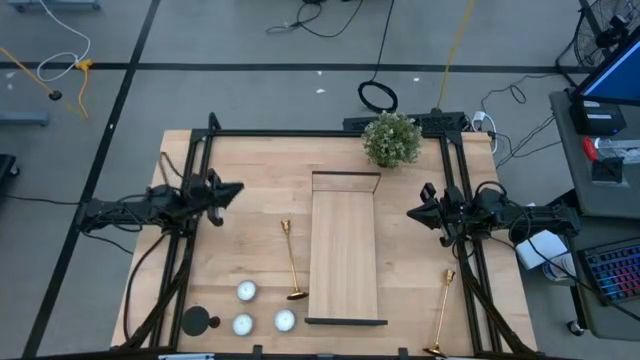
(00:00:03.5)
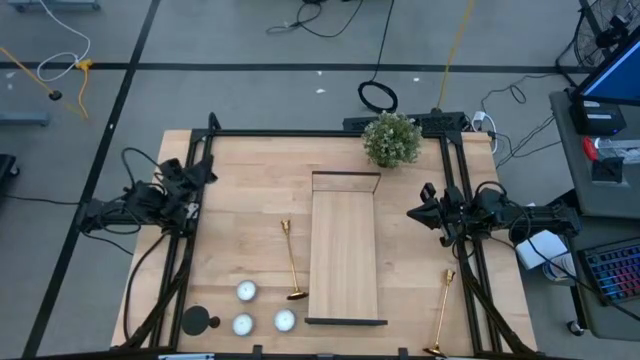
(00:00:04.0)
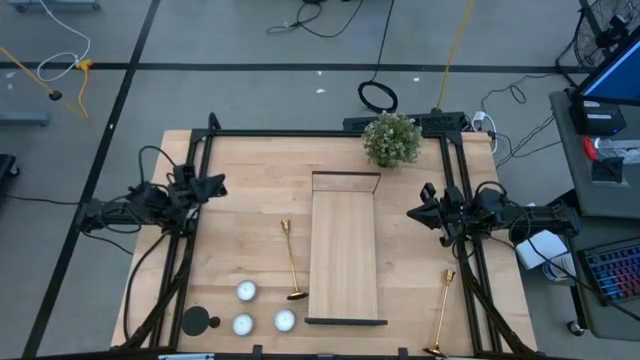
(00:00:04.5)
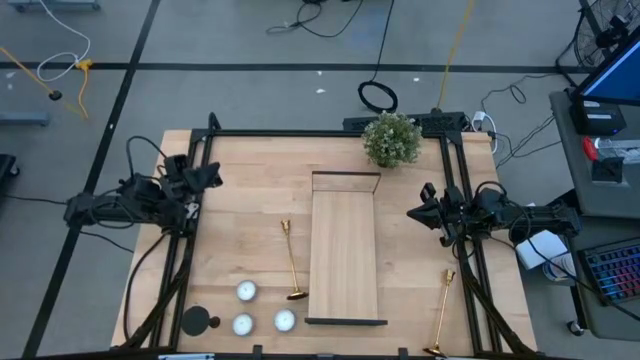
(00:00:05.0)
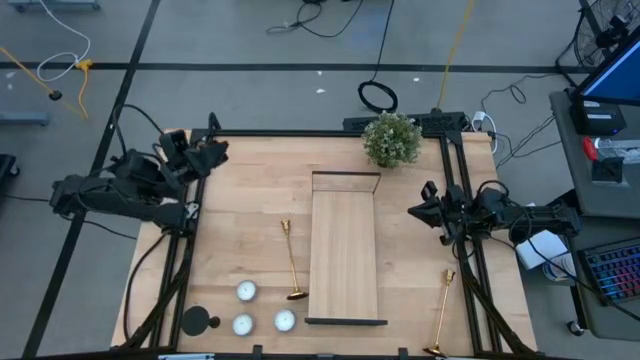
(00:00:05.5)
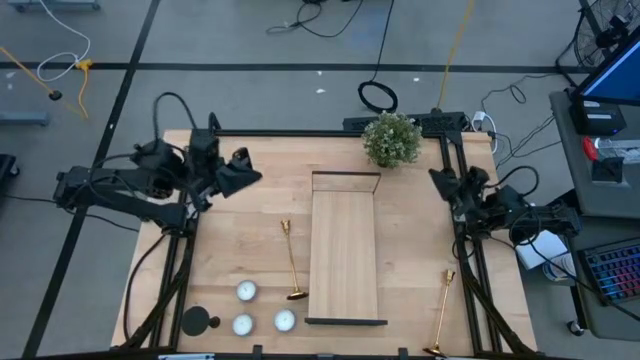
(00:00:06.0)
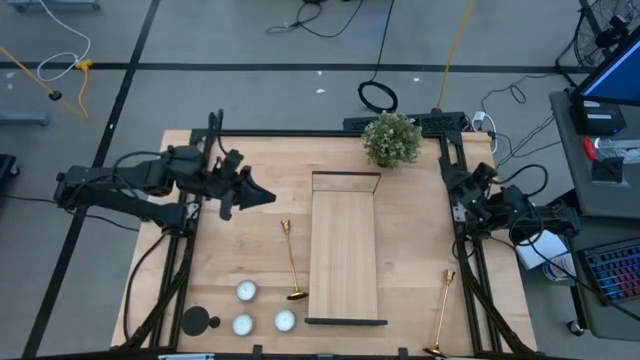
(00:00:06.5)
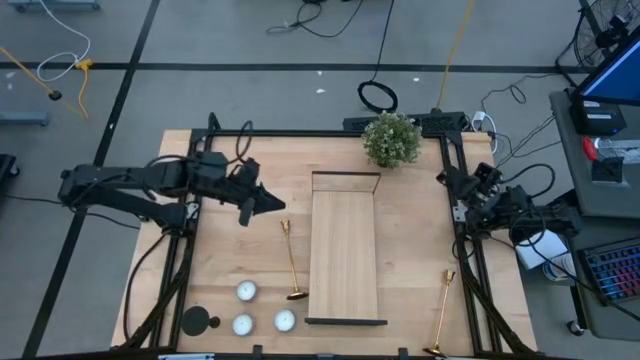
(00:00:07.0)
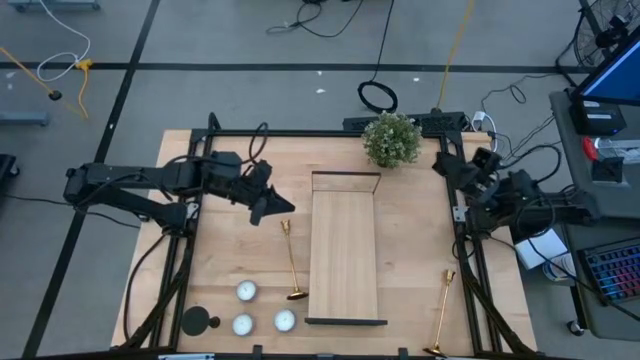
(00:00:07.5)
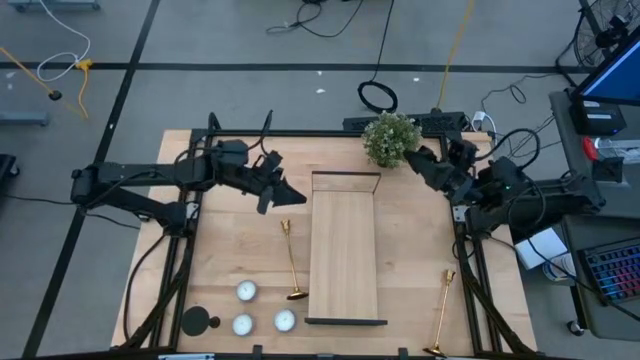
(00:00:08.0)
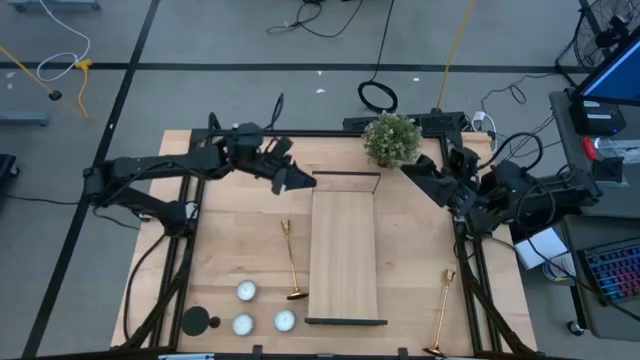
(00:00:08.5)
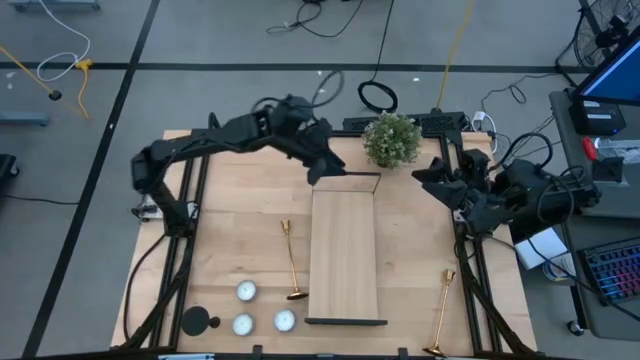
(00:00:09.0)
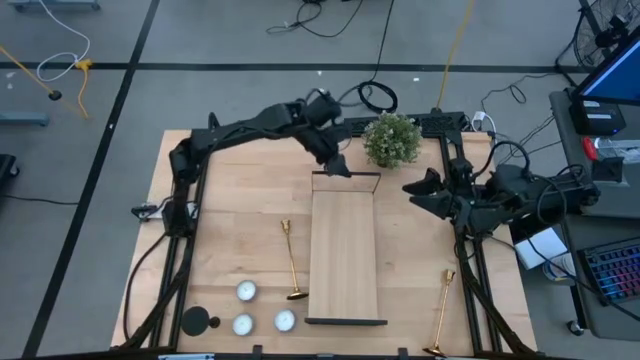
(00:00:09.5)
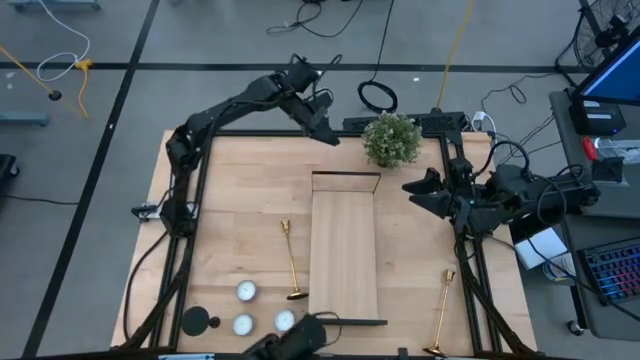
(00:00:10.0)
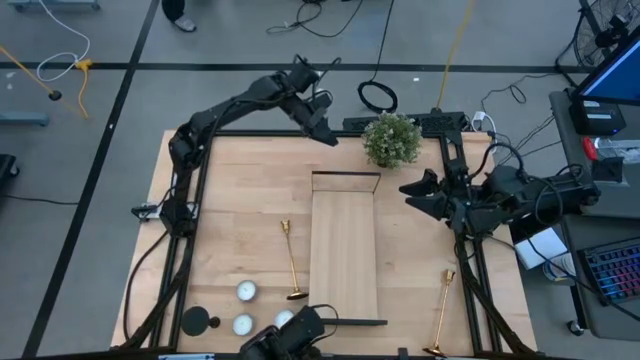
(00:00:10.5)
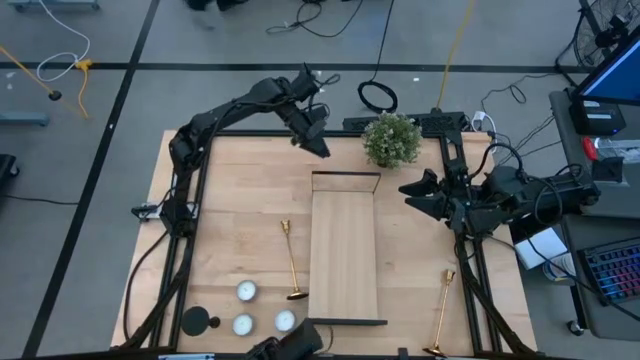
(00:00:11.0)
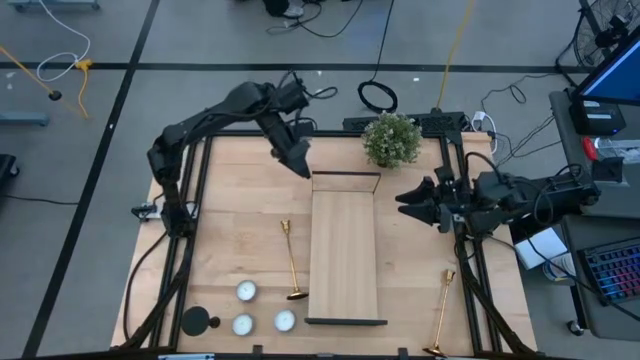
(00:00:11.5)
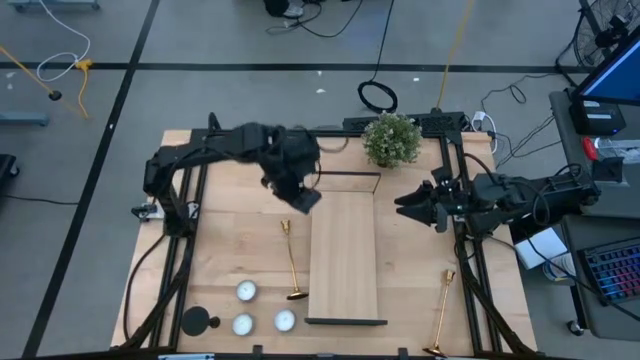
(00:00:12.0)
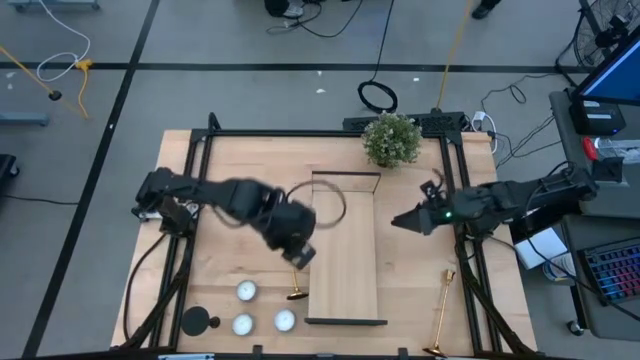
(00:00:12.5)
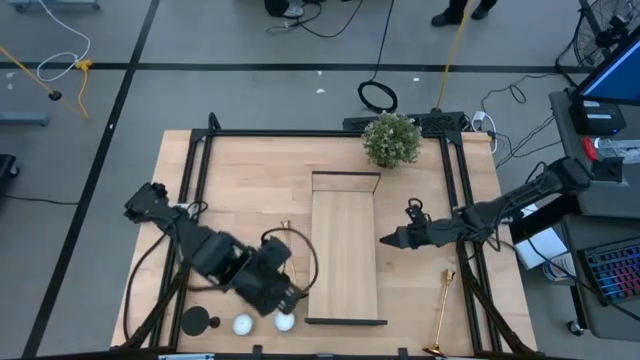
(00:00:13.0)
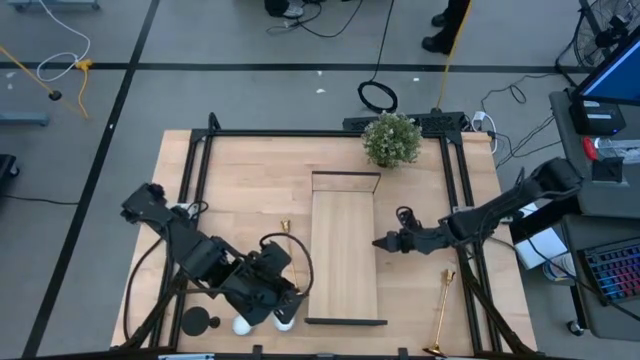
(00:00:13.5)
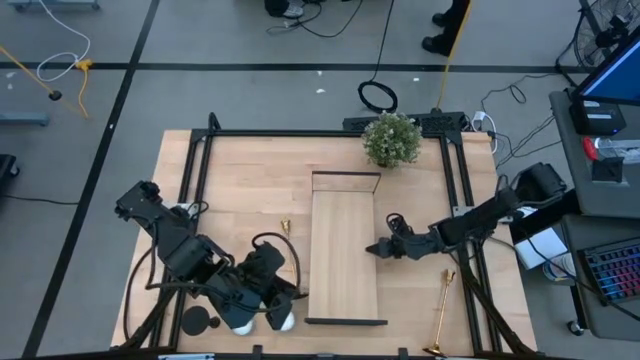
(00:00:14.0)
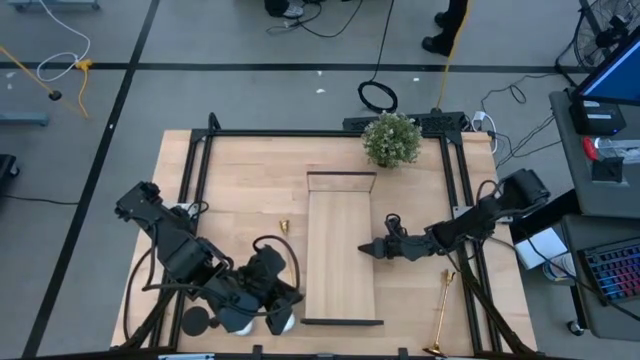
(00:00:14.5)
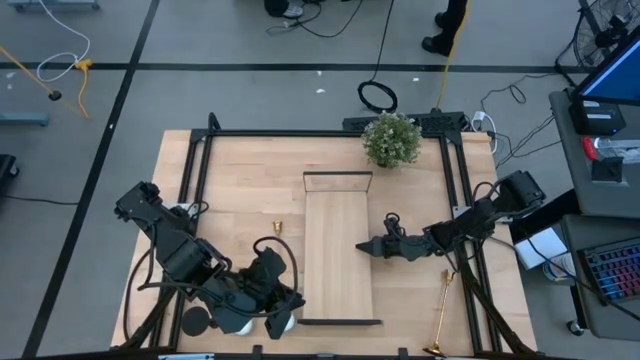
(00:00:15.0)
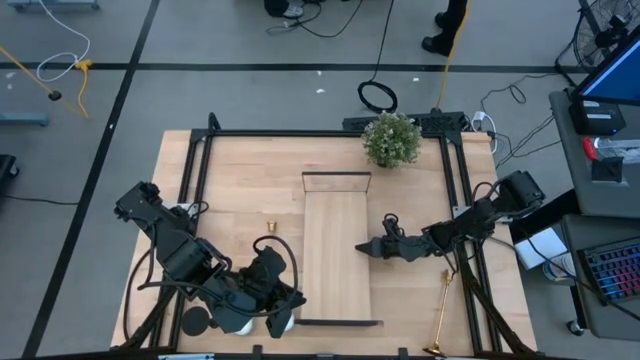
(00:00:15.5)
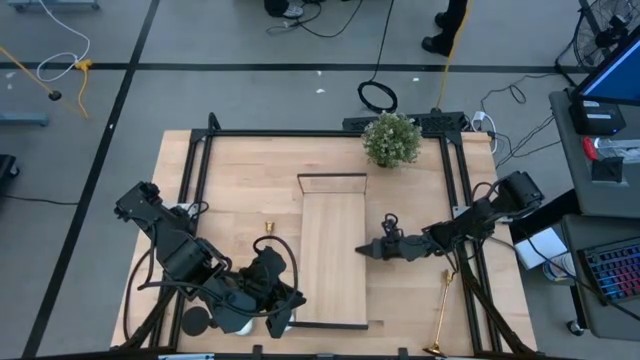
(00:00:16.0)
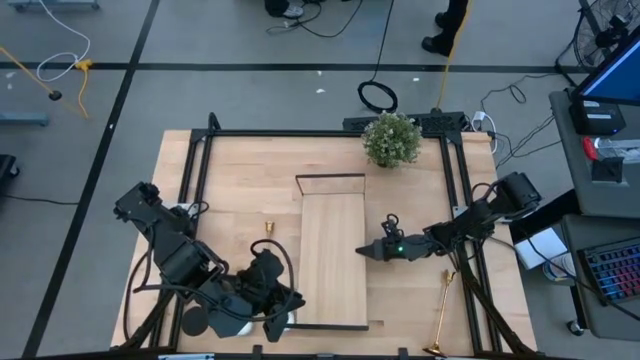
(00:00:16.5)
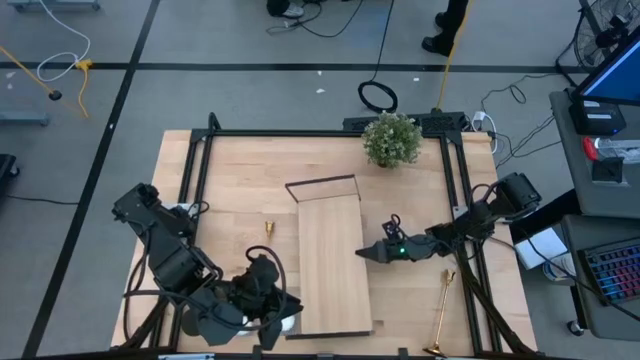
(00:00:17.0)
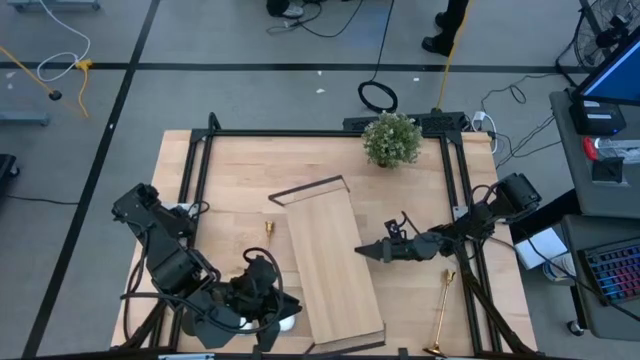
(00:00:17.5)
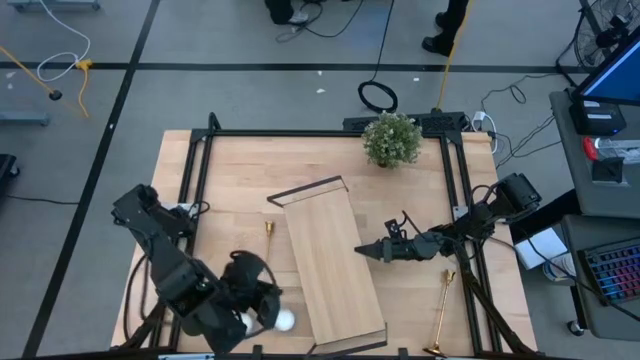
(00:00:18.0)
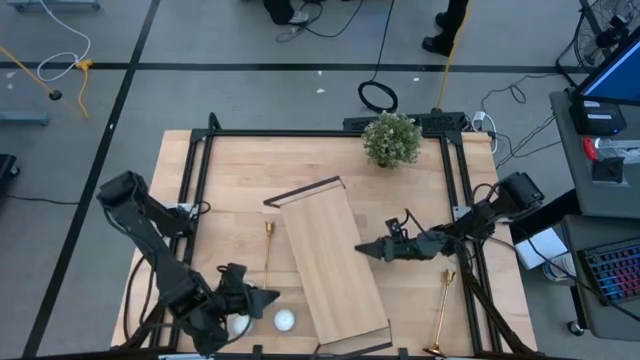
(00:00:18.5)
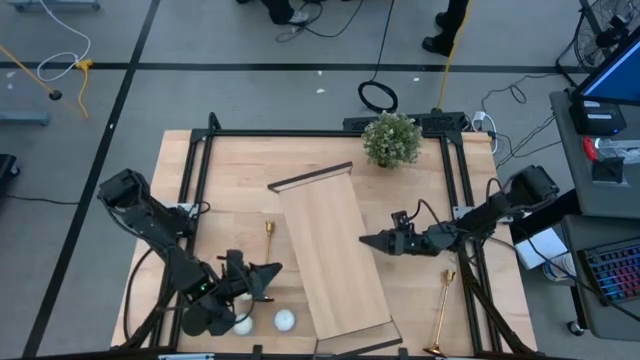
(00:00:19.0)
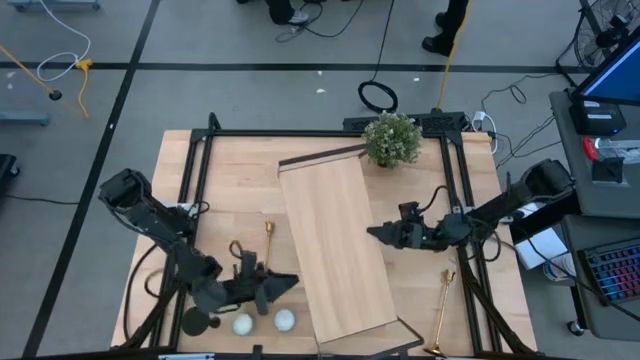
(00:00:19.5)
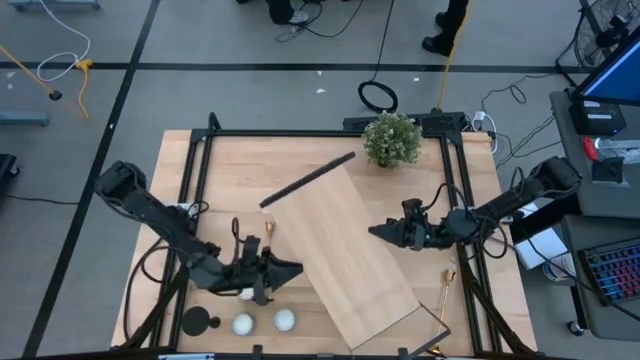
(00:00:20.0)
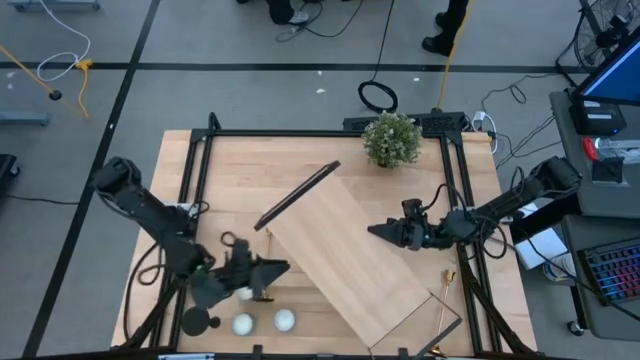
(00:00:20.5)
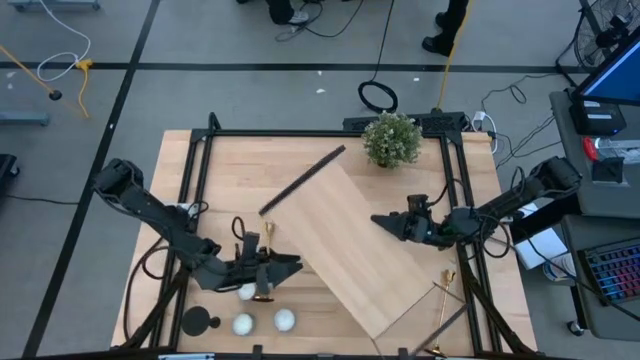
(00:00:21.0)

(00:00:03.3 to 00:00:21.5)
Task: Pick & Place candle stick holders
Adjust the shelf
